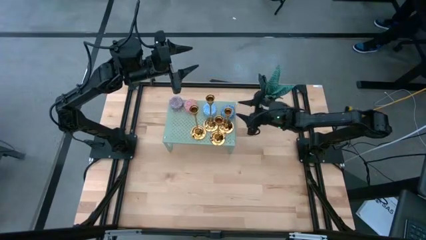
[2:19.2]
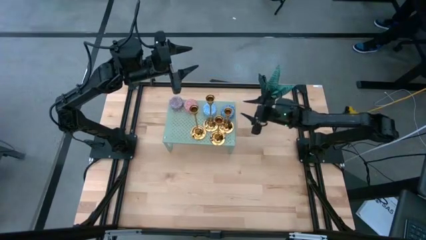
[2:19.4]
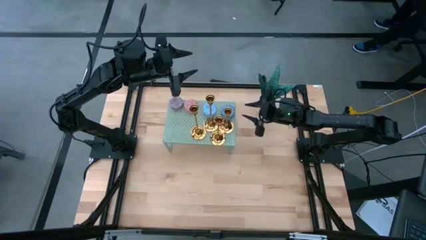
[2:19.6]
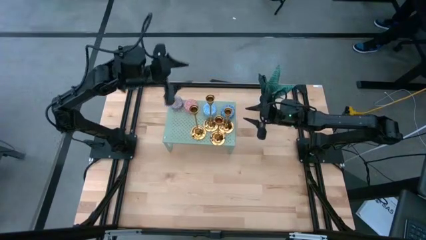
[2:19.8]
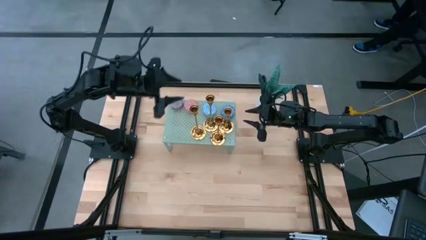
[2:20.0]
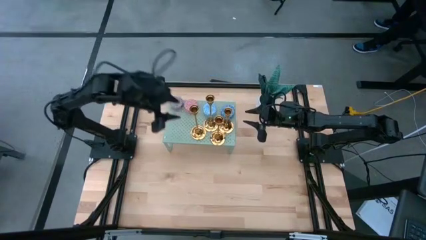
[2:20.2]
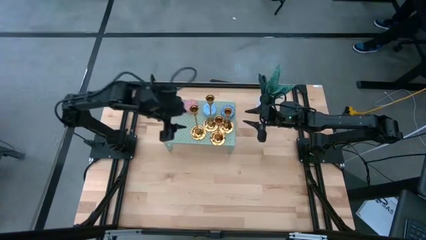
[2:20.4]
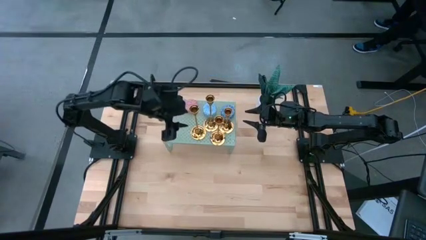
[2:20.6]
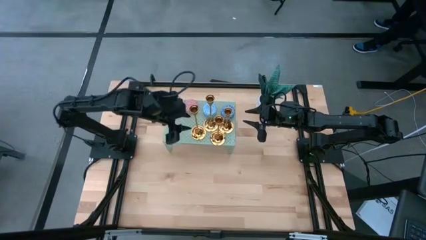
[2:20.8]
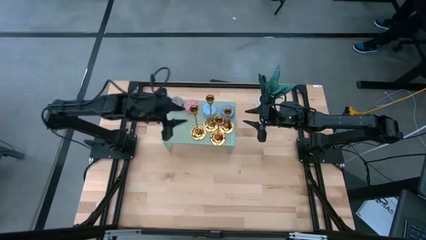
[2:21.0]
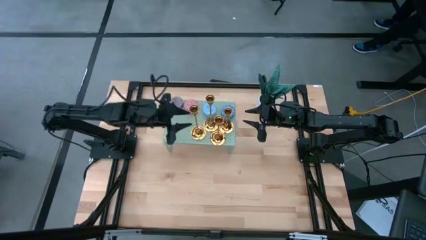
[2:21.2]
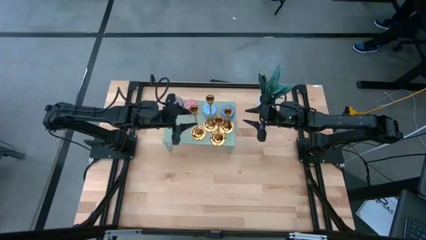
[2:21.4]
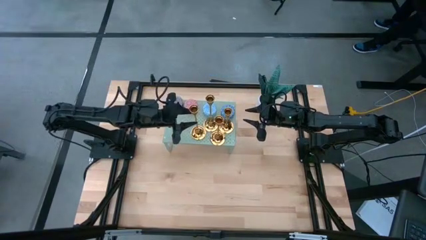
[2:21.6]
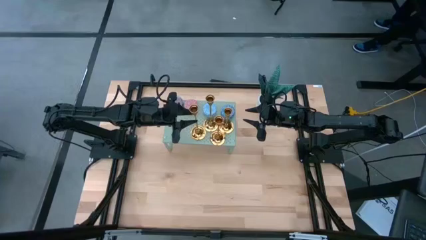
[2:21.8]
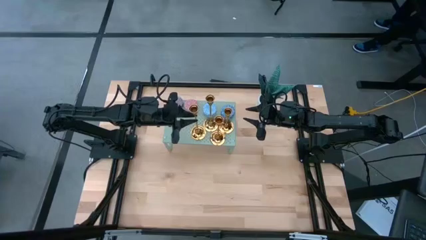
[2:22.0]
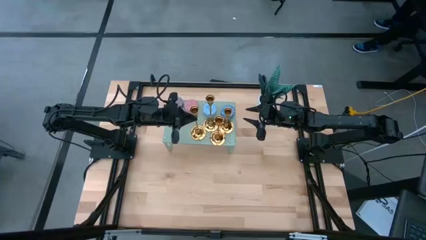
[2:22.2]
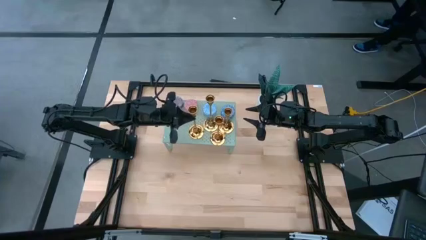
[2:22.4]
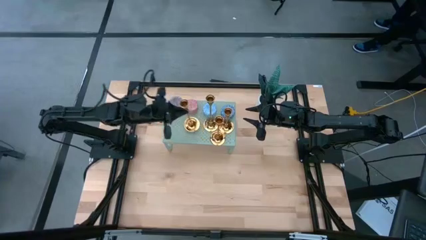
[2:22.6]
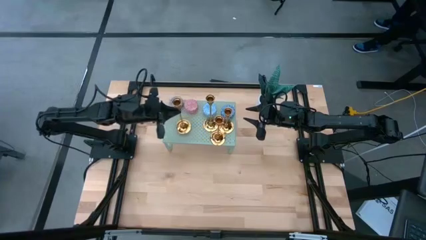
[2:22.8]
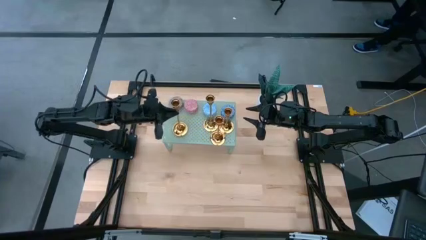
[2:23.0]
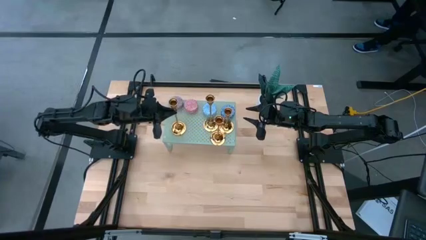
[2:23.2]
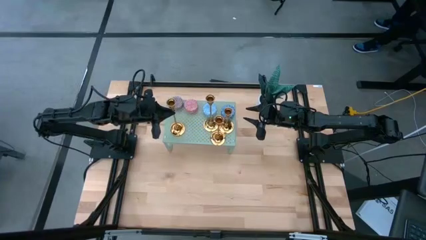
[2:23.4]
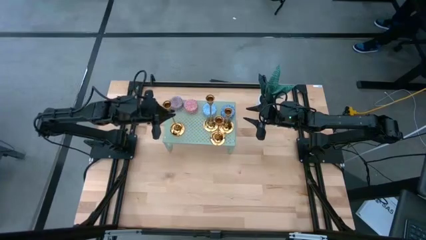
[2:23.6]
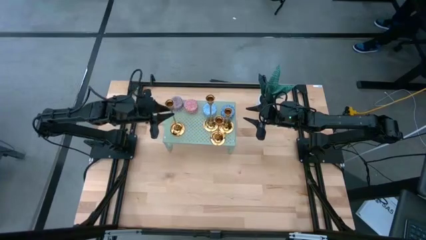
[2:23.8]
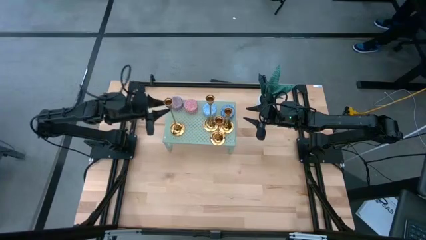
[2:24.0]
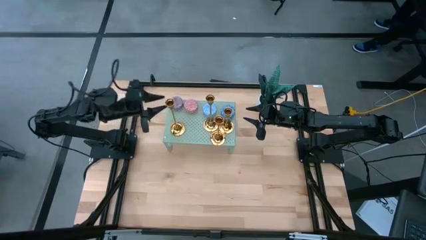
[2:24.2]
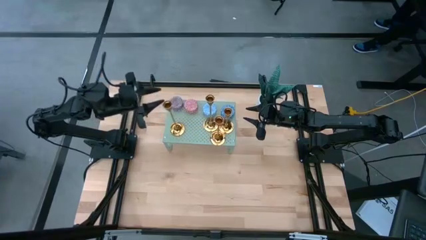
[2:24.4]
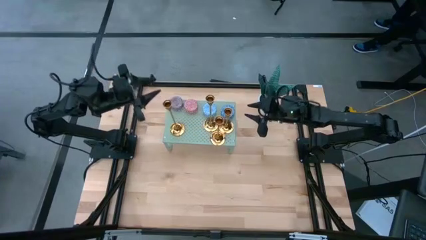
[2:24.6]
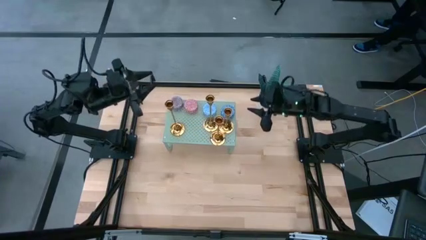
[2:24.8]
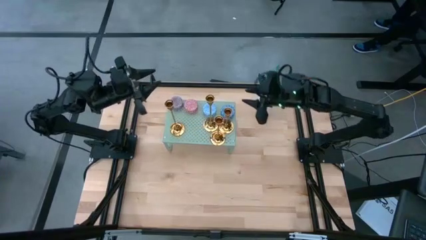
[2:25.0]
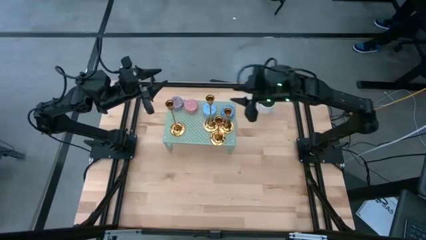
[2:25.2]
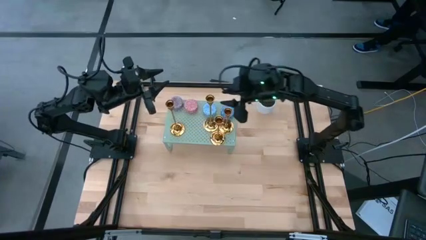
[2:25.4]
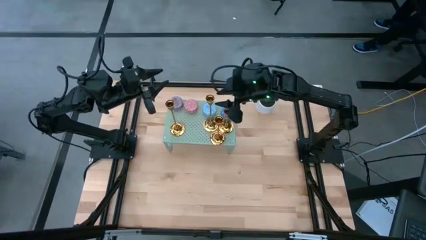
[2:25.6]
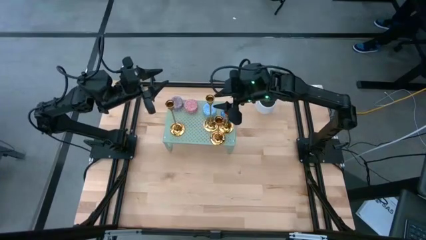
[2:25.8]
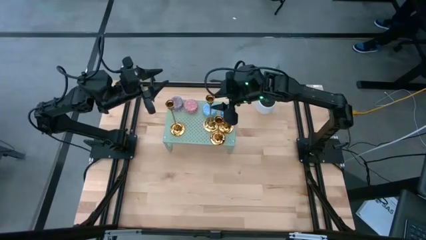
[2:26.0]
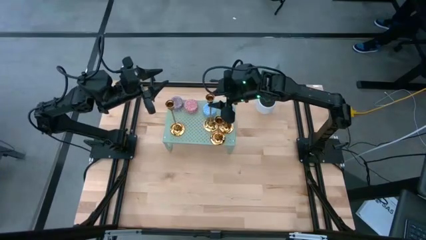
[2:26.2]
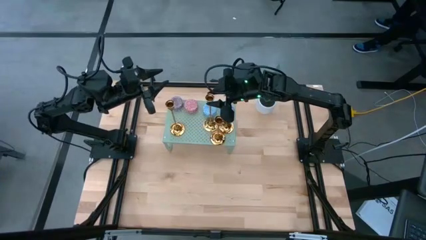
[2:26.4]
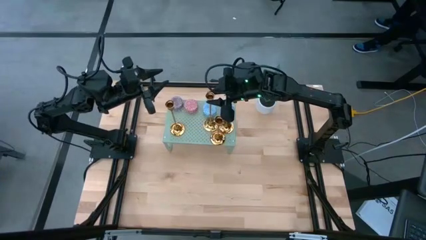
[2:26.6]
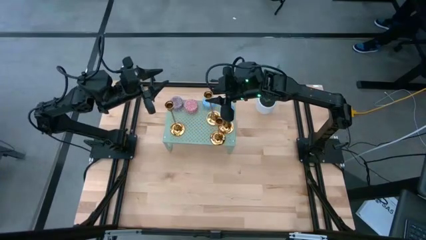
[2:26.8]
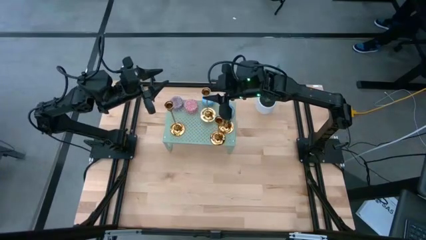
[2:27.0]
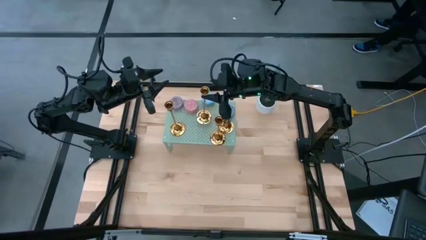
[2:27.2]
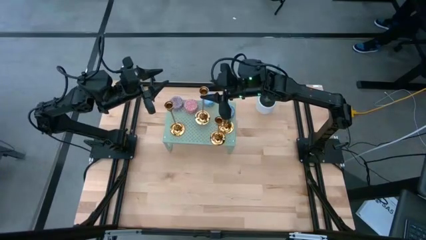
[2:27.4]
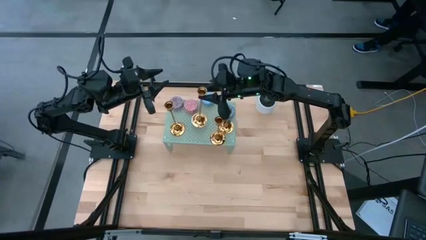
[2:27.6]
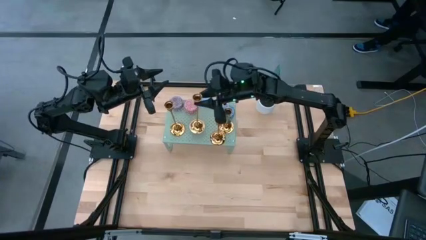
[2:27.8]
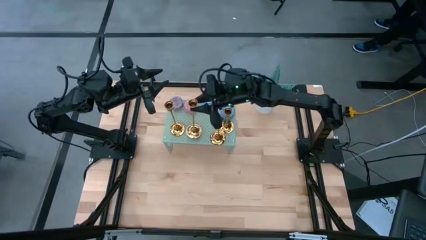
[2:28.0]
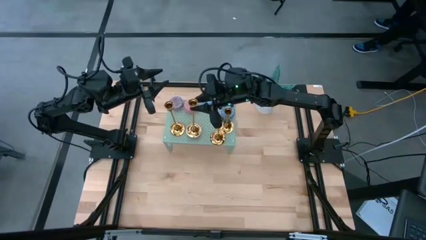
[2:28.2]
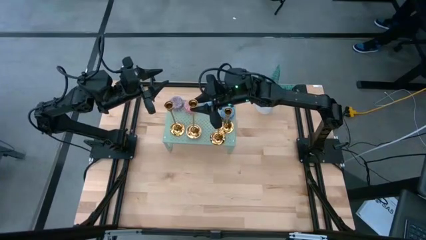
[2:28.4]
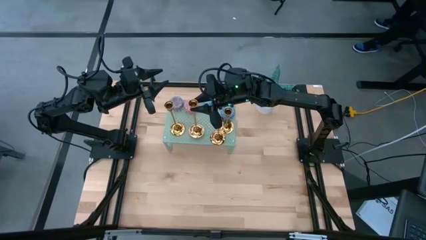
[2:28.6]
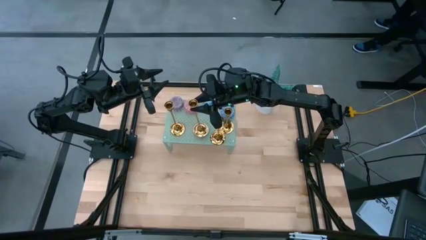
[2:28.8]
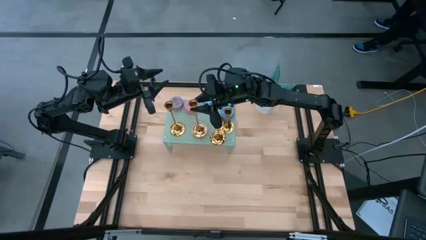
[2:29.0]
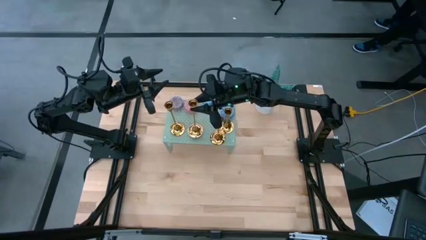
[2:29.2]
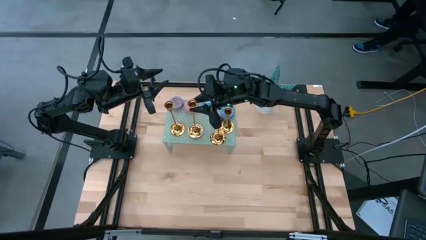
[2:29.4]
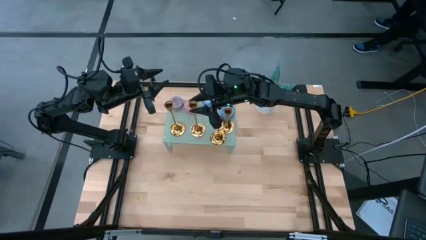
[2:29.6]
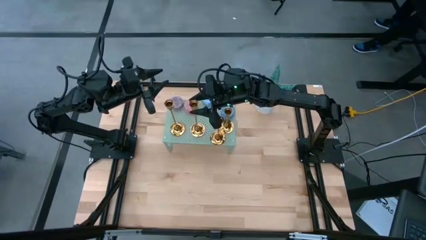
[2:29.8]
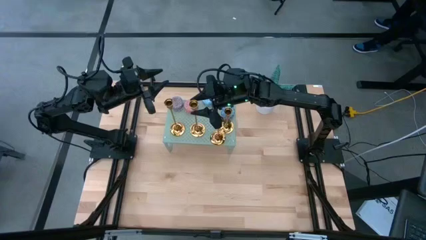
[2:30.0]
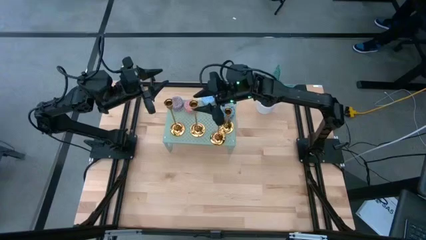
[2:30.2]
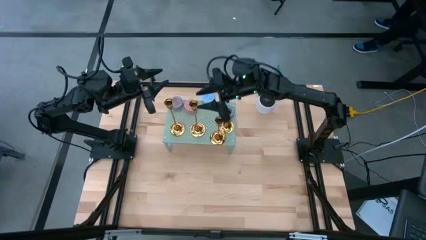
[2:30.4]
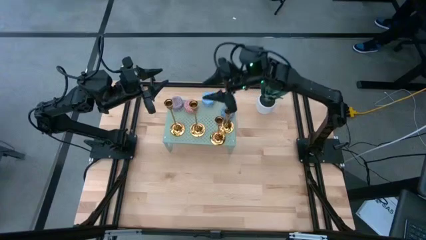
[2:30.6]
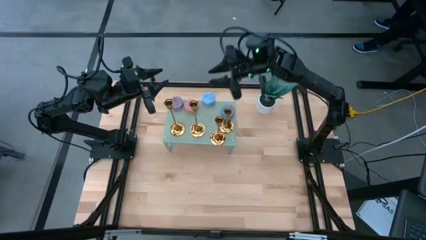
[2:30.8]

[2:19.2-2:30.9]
Task: Pick & Place candle stick holders
Adjust the gold candle holders and light blue scented candle on the shelf

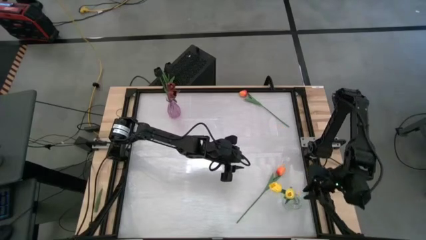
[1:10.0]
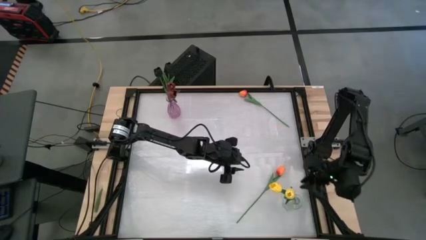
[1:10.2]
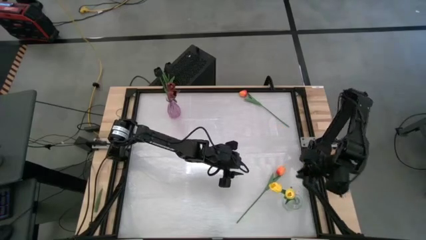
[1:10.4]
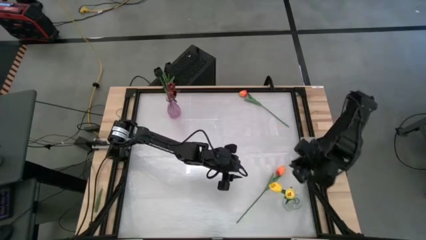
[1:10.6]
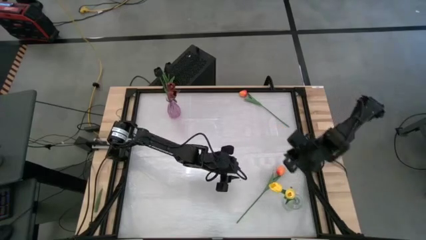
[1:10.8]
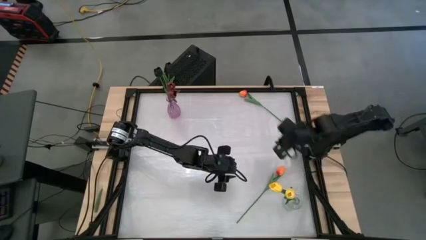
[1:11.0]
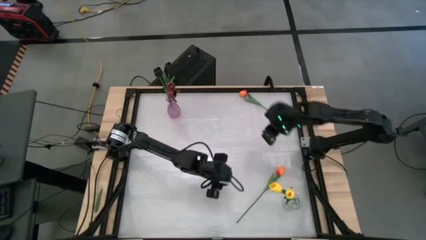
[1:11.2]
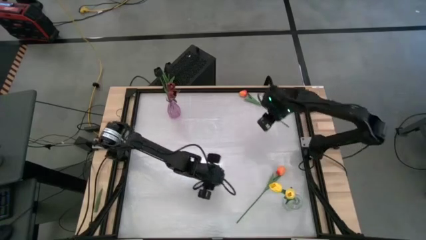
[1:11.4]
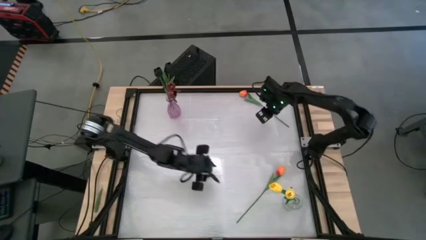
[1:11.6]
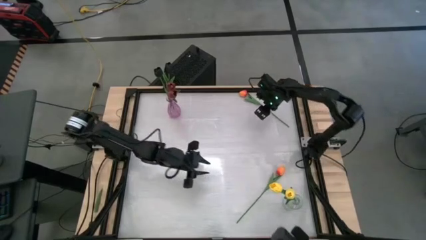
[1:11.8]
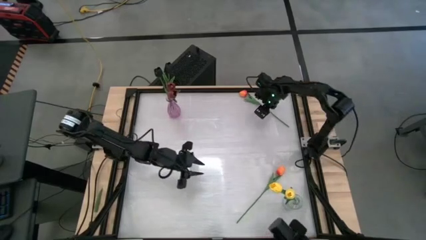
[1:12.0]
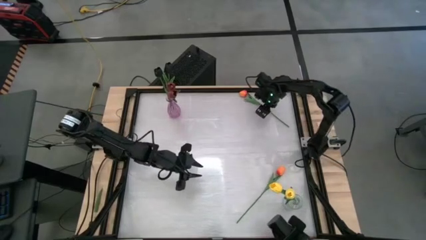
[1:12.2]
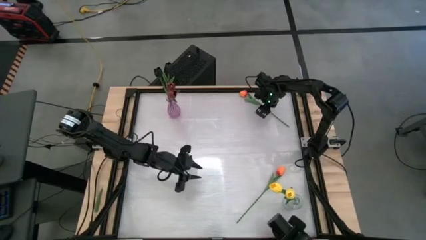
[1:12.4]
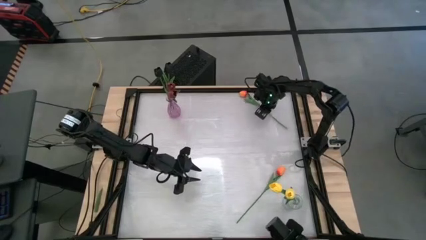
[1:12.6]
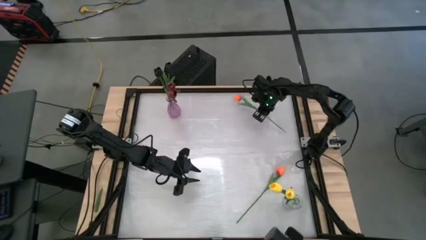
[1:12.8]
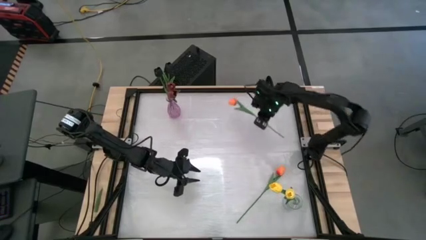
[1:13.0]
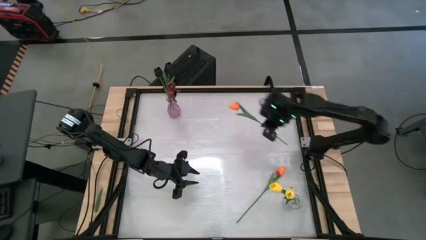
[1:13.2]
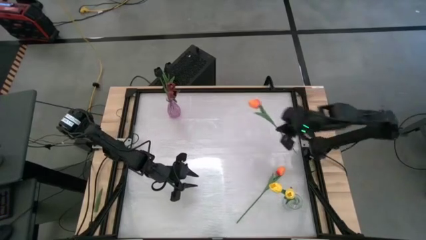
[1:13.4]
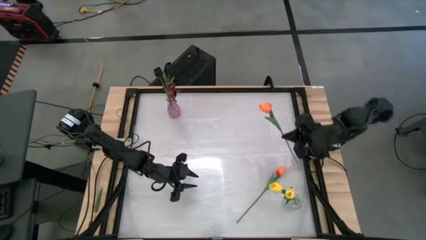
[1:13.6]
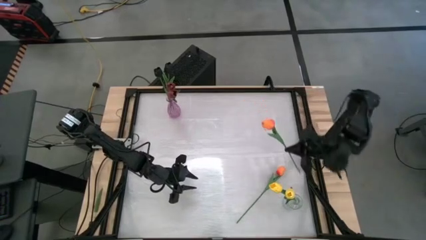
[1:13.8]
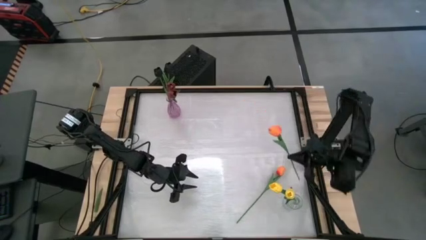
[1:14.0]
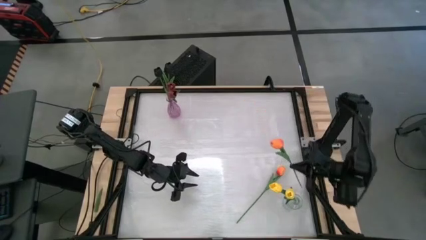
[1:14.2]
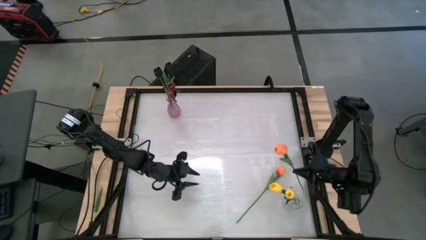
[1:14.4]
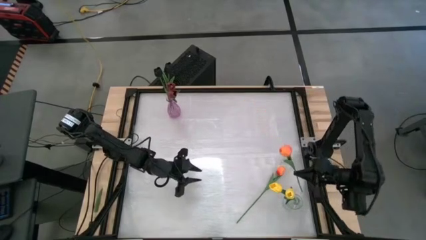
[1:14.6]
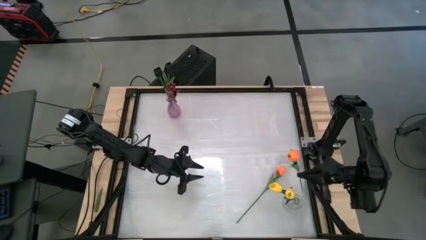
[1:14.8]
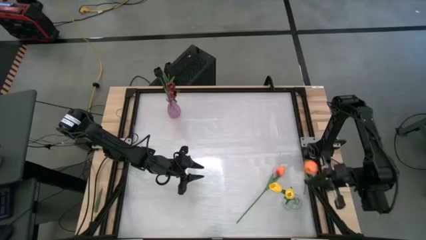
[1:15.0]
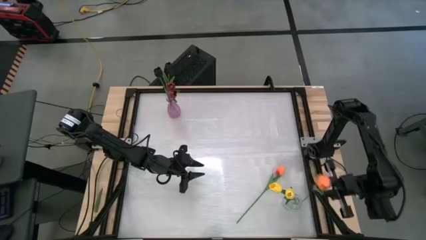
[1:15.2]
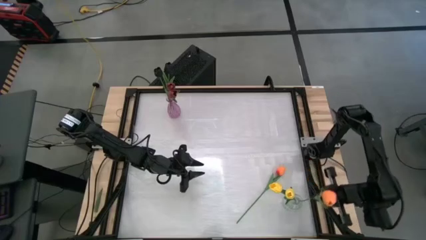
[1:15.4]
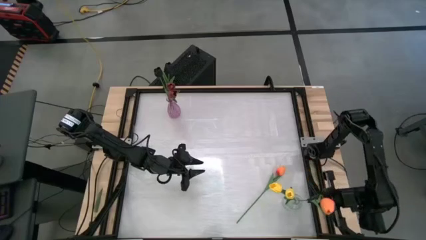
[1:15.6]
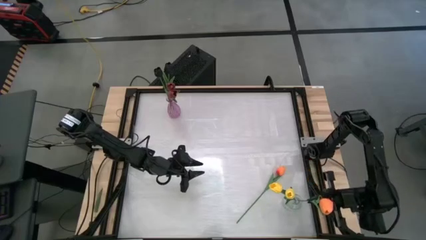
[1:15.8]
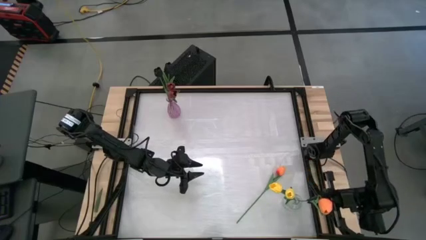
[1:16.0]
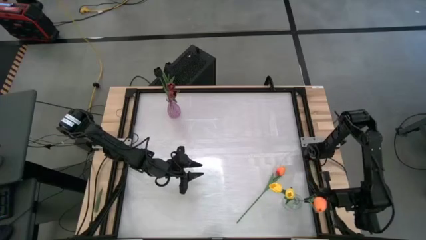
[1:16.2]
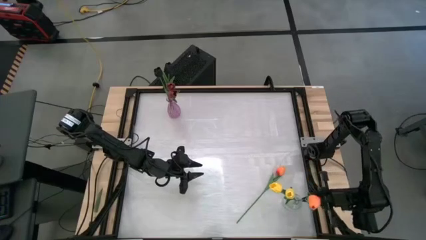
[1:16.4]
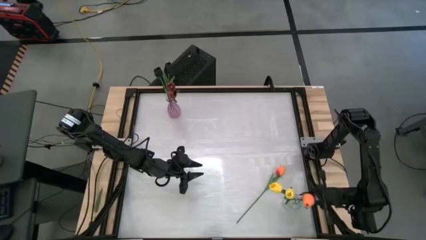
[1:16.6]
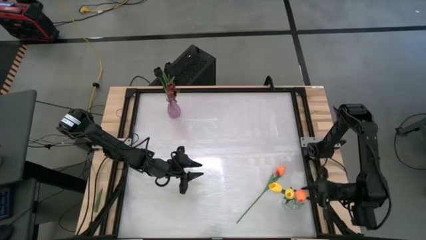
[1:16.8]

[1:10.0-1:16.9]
Task: Sort flowers into vase by color
Put the top orange flower into the transparent vase
